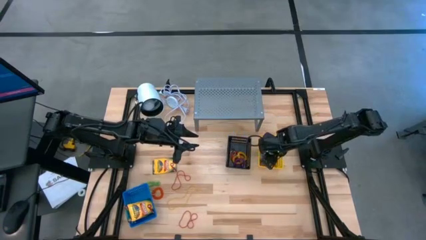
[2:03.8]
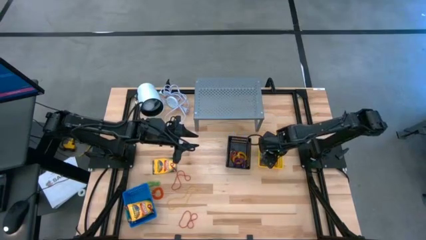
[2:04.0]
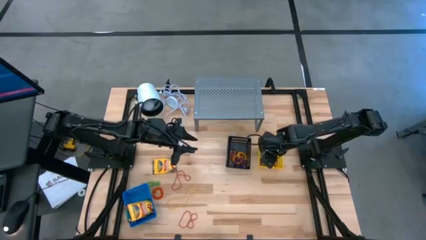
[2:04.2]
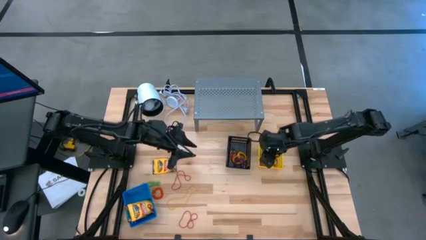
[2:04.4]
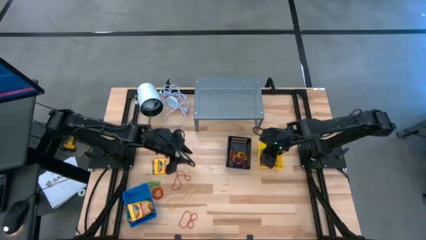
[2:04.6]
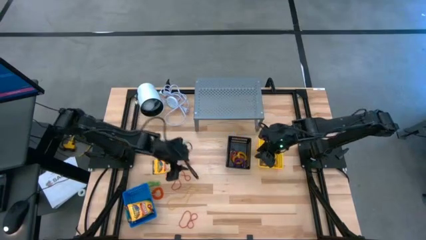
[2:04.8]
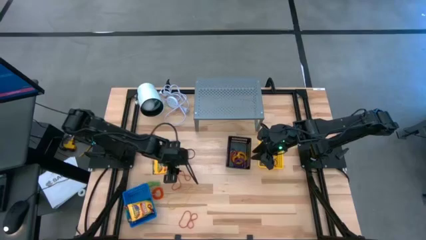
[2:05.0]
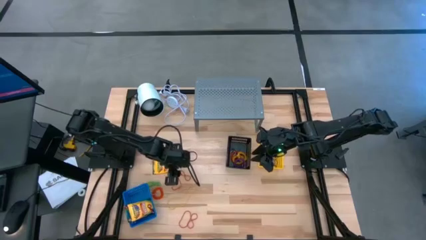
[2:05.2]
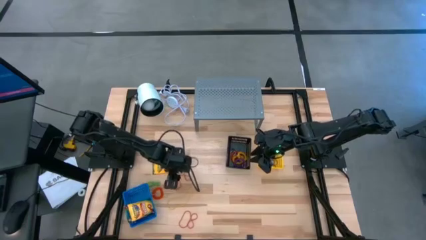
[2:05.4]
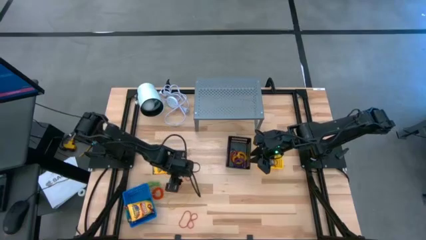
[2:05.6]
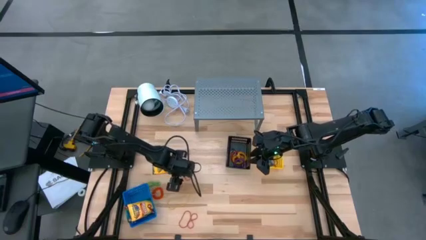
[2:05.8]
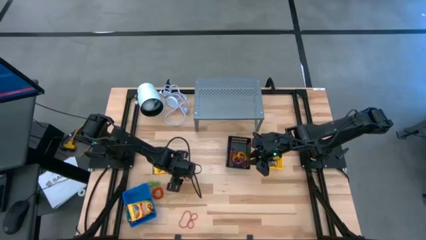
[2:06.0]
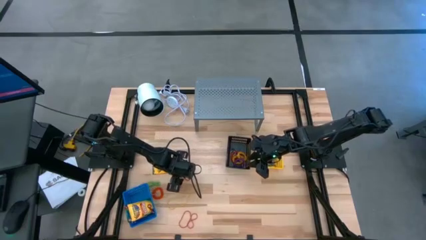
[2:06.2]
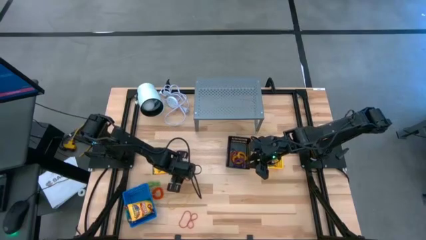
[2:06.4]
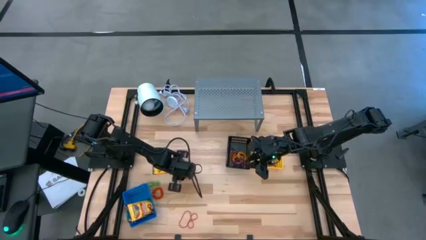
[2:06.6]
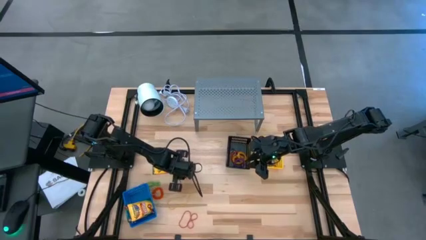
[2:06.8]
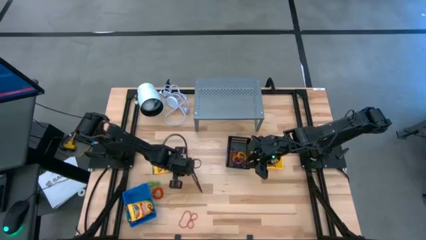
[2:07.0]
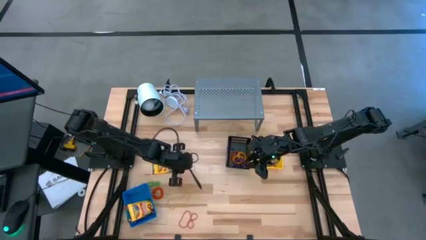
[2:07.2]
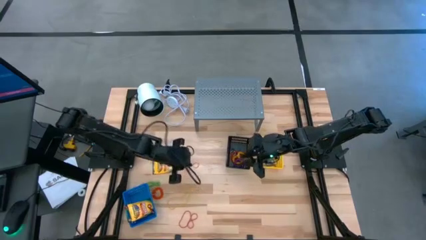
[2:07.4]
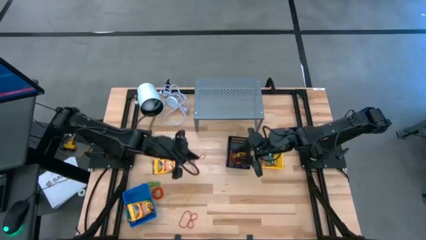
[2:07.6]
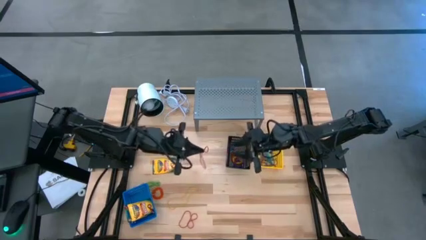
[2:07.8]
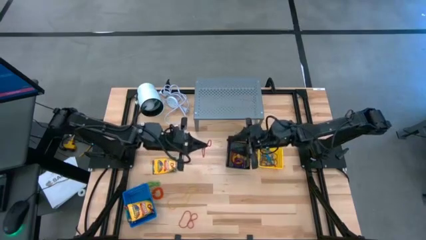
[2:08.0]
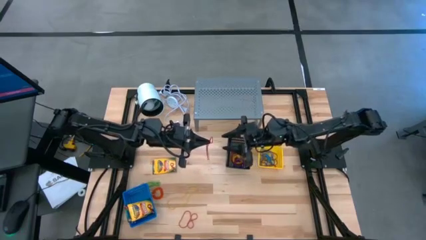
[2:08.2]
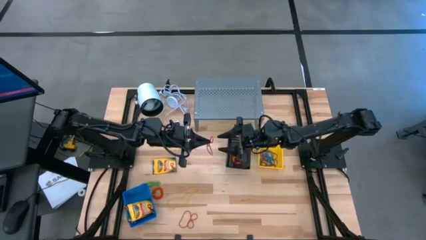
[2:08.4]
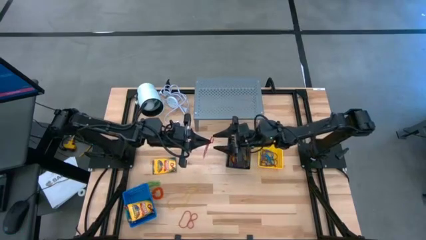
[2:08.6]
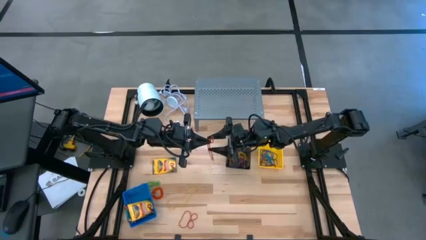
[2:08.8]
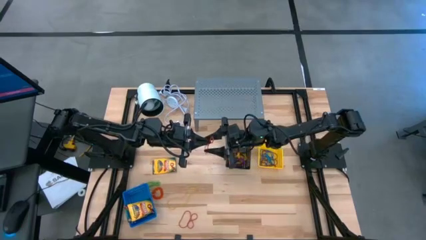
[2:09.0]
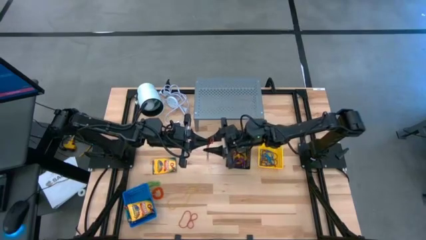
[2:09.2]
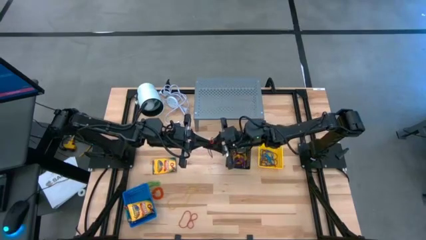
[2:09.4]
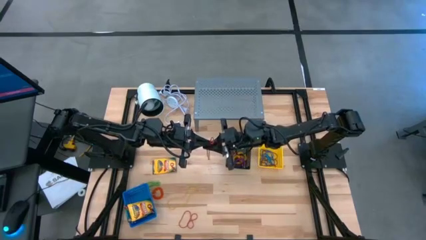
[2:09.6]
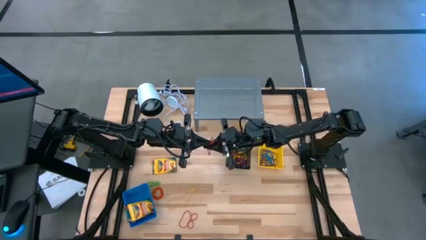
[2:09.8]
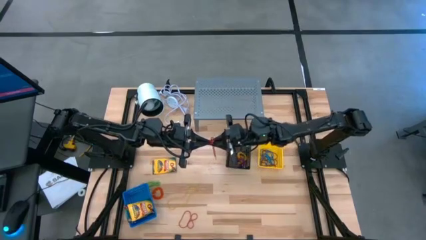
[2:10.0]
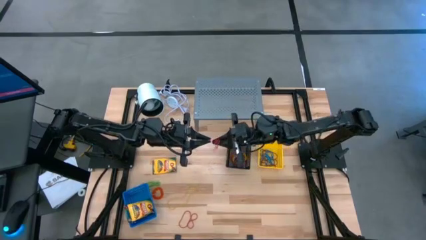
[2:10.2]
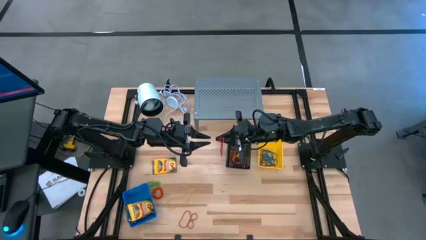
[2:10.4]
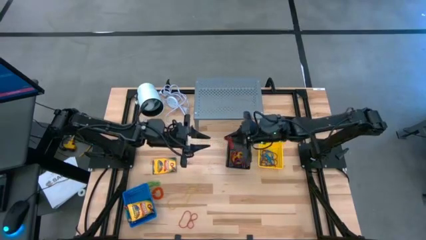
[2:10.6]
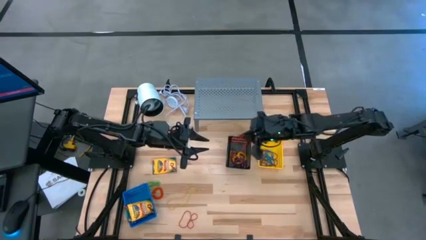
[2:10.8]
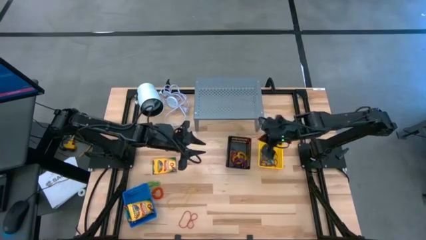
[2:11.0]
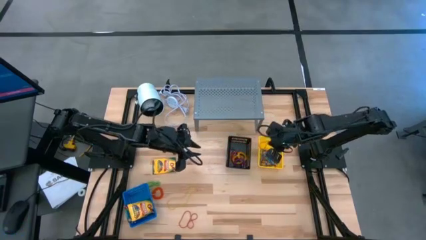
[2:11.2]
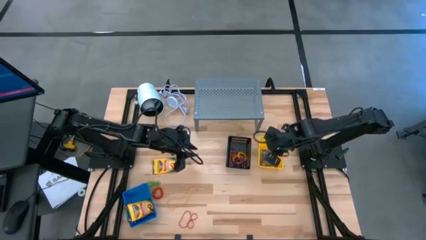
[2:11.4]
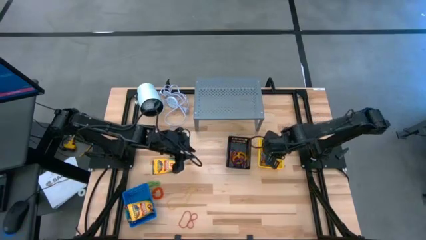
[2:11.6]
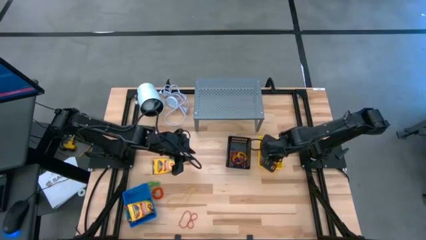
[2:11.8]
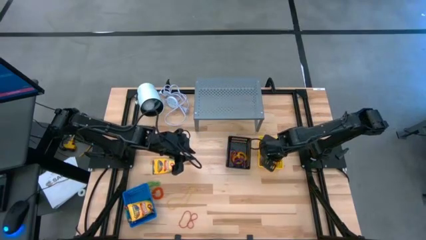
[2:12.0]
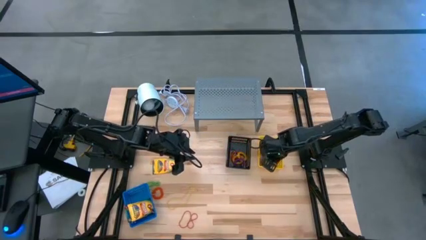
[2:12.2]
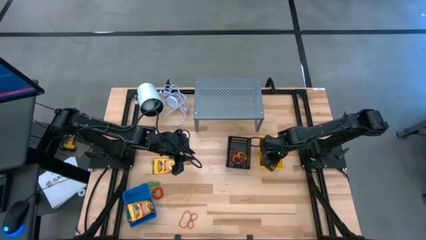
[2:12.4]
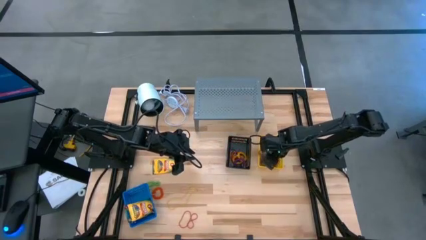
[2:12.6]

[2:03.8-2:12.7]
Task: Pick & Place Office Desk Supplies
Put the red rubber band into the yellow basket

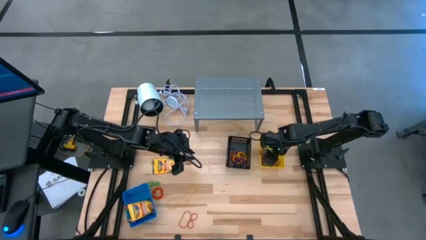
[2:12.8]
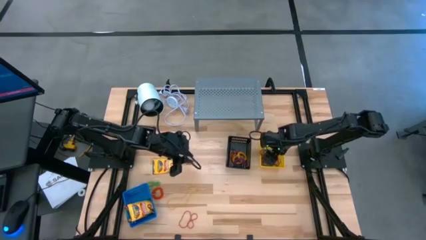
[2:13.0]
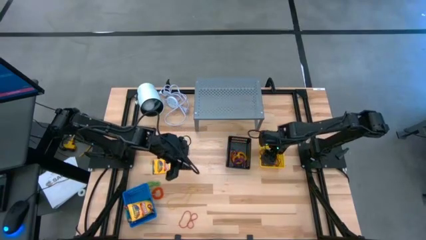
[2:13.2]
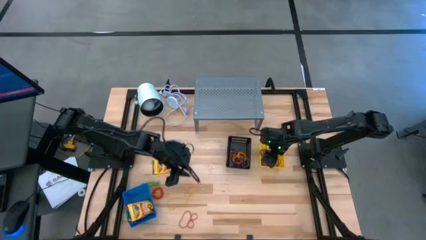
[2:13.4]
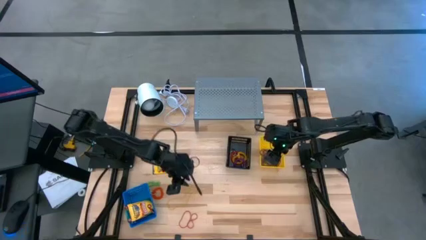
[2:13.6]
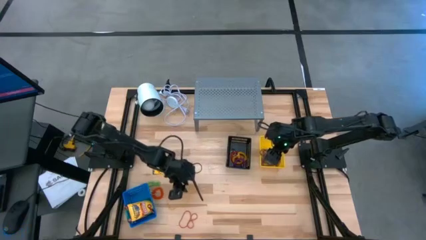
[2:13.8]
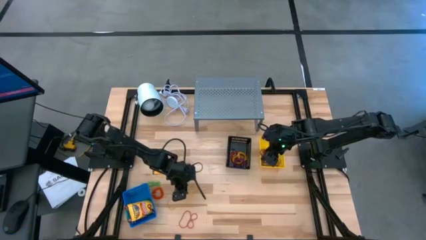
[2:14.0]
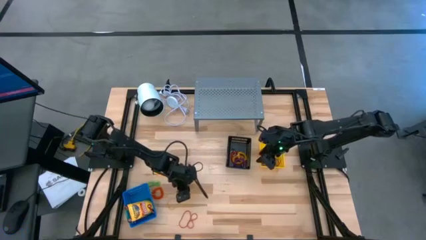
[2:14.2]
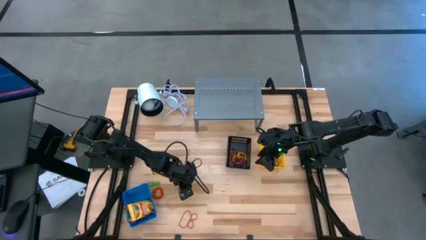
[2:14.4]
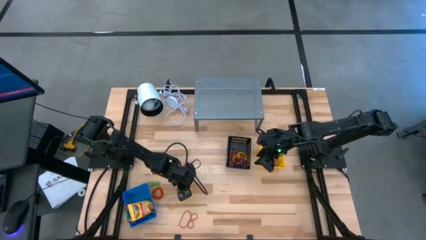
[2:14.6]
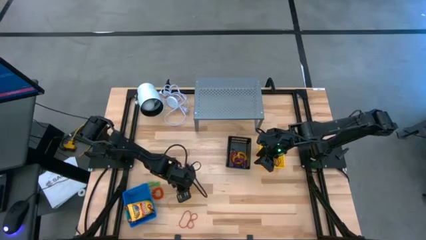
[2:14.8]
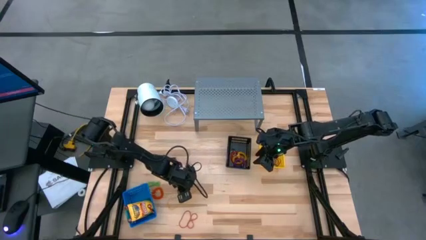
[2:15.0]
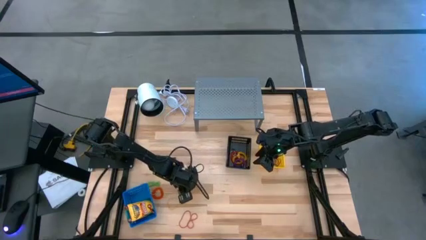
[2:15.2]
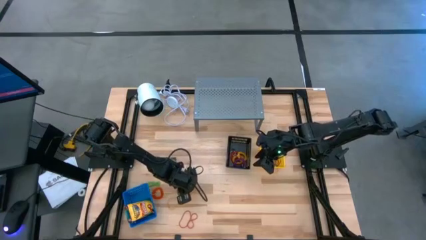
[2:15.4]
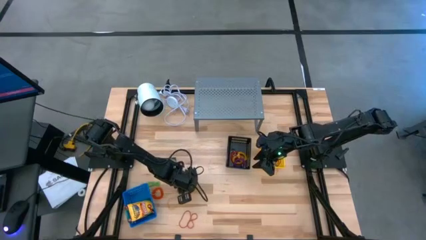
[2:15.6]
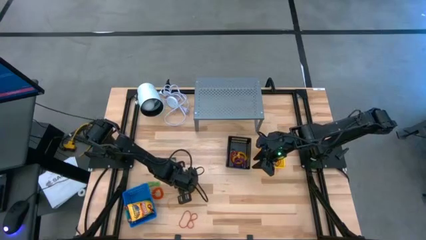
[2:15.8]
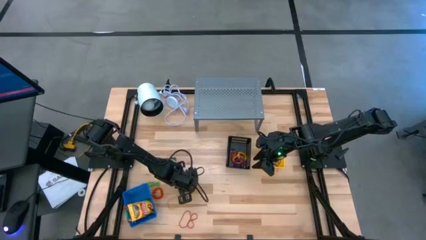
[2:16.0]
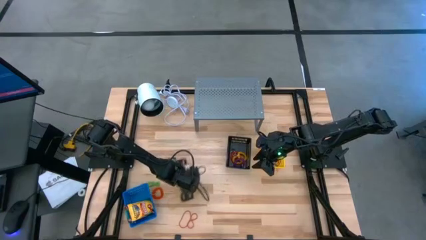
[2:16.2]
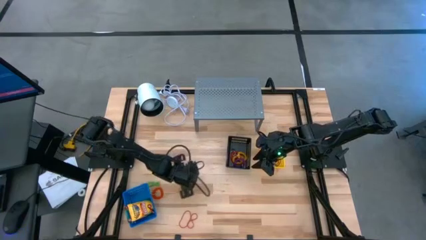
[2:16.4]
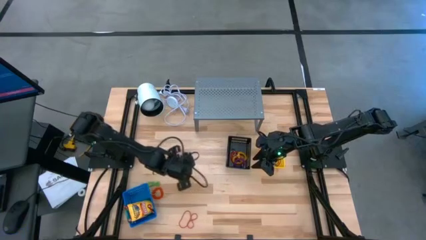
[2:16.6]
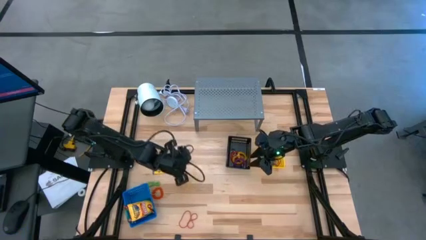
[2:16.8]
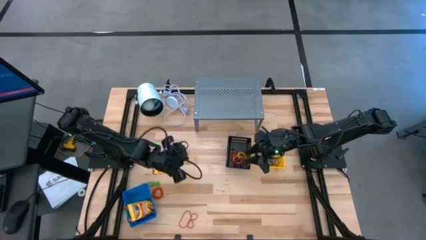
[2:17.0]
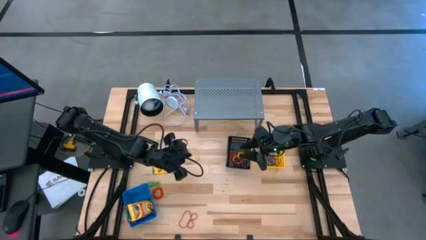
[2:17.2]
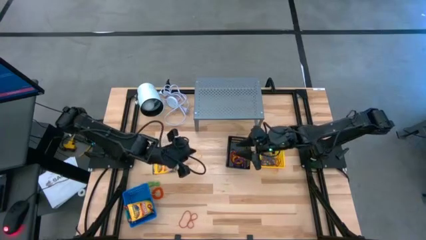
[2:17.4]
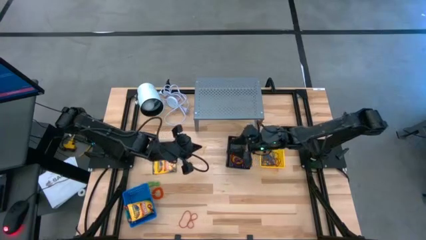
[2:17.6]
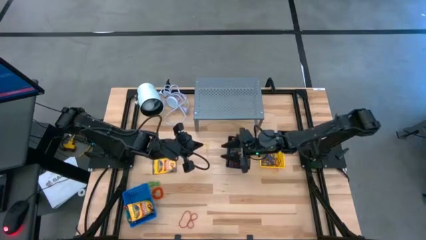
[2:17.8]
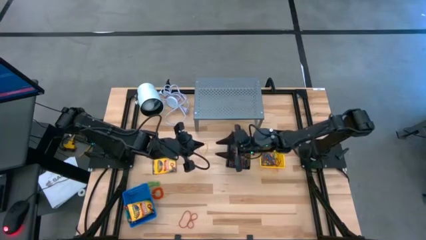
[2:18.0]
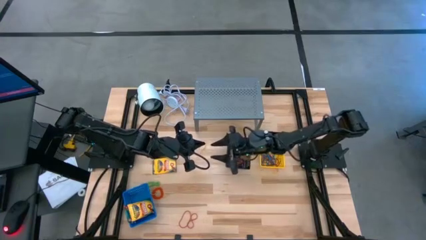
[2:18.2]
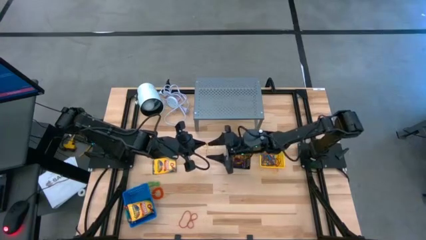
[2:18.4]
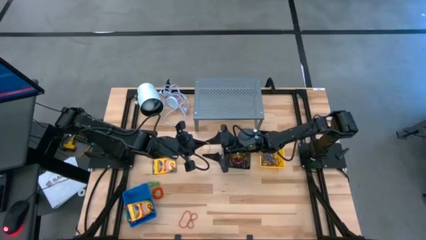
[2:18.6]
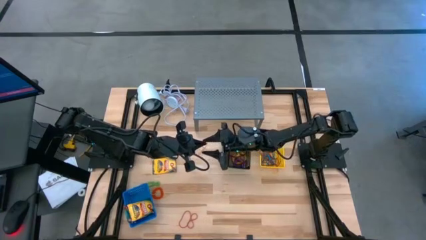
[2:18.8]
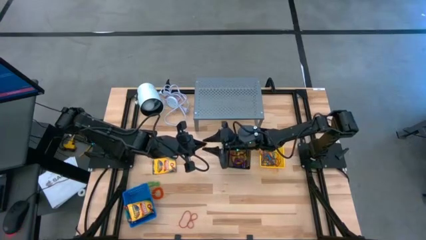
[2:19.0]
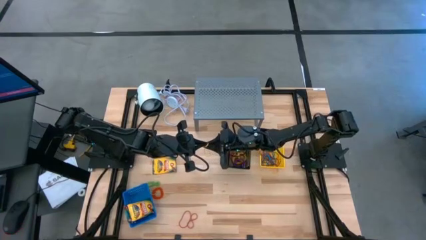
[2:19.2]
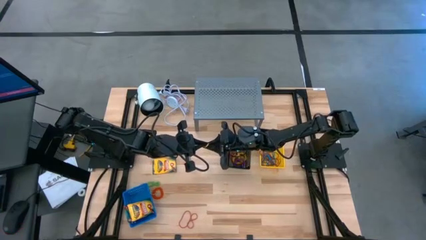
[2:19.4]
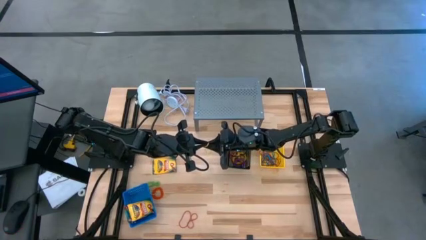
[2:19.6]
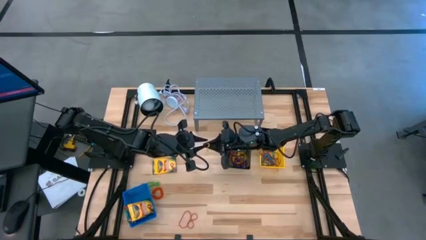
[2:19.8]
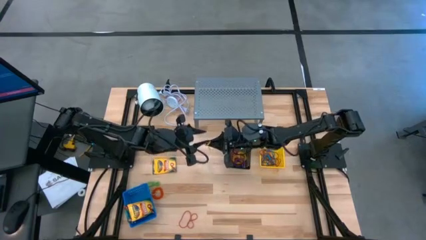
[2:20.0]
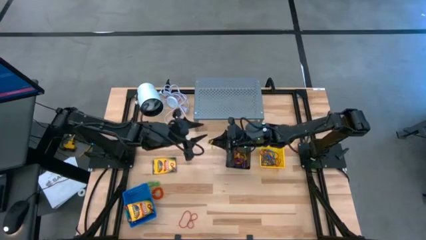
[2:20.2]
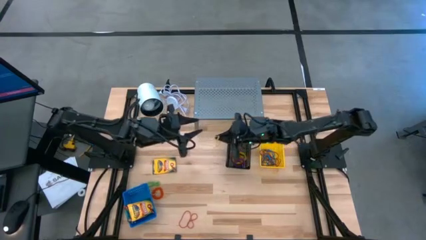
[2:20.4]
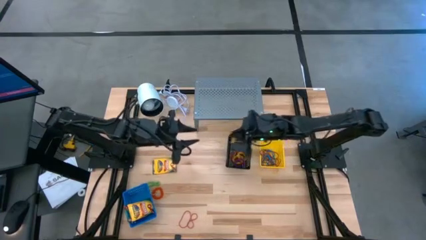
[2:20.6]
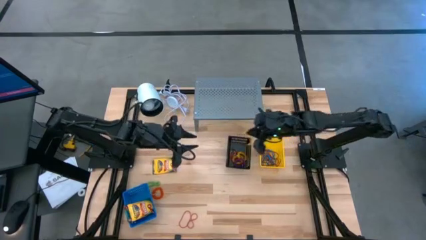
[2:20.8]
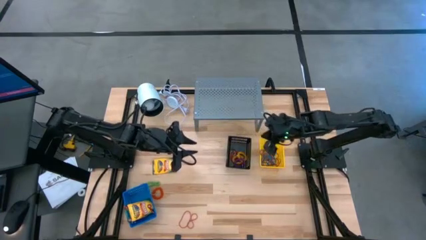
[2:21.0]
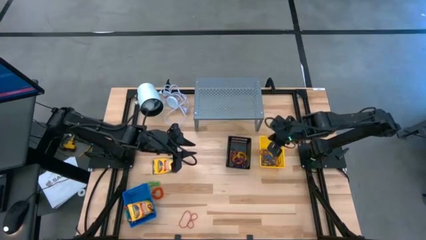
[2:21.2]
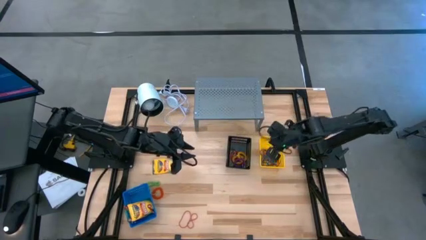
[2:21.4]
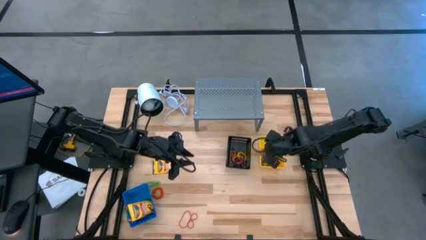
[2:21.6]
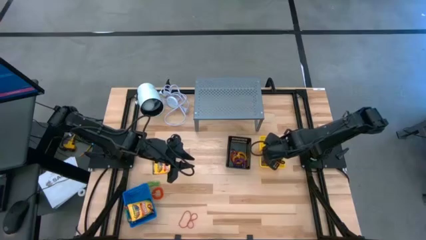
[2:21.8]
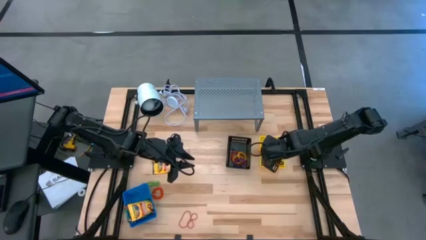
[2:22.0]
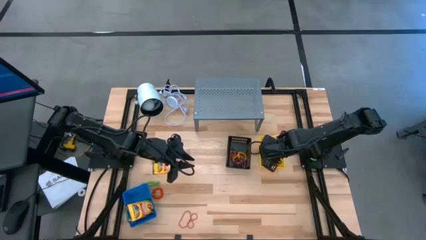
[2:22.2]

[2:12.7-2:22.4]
Put the yellow rubber band into the yellow basket
